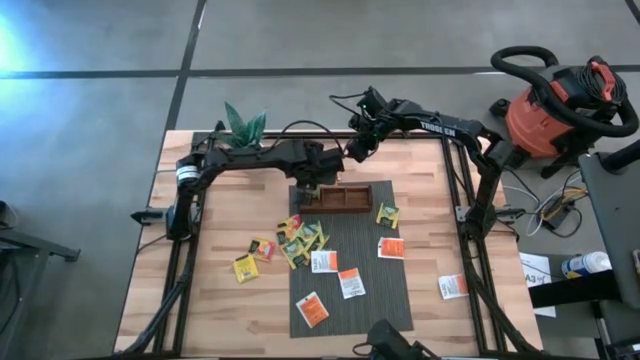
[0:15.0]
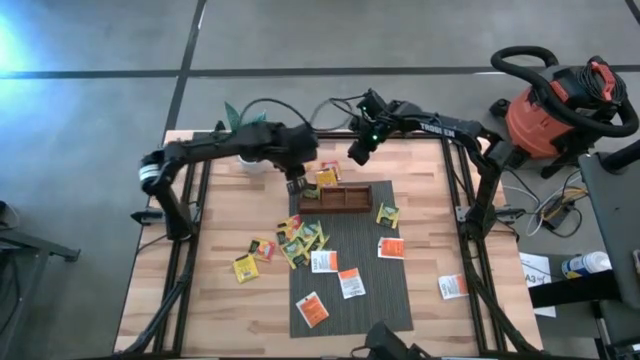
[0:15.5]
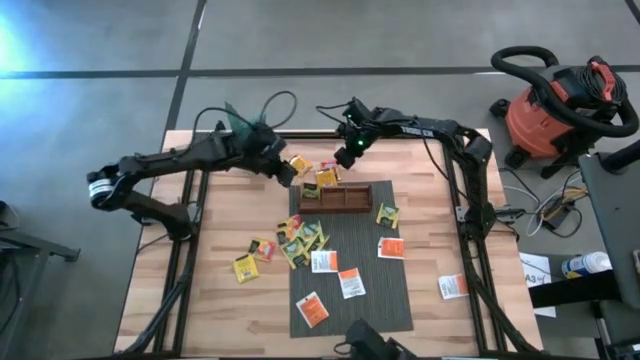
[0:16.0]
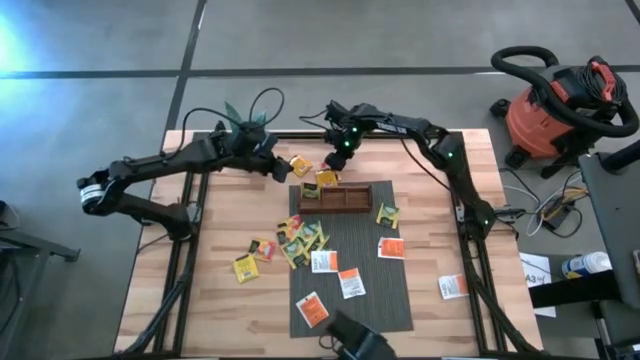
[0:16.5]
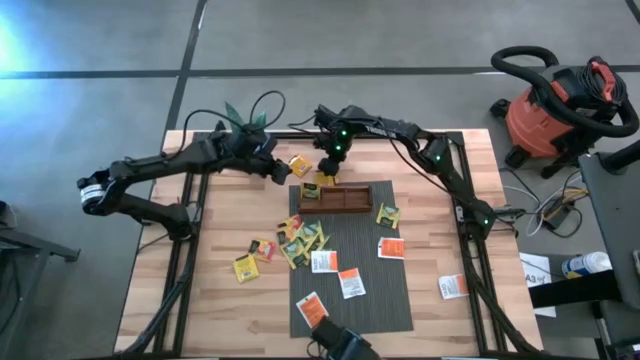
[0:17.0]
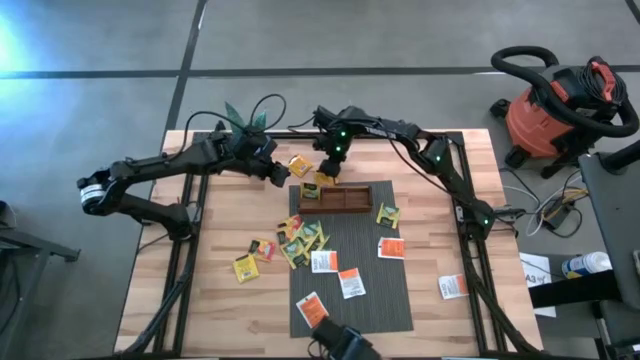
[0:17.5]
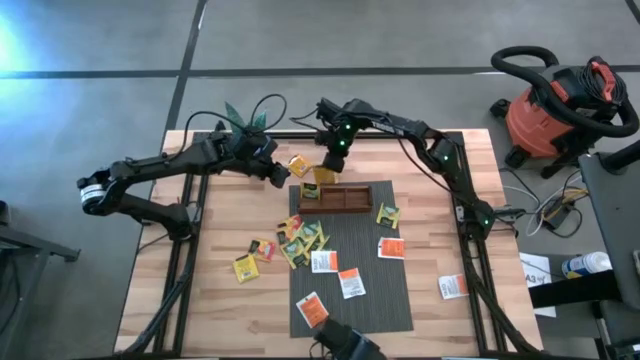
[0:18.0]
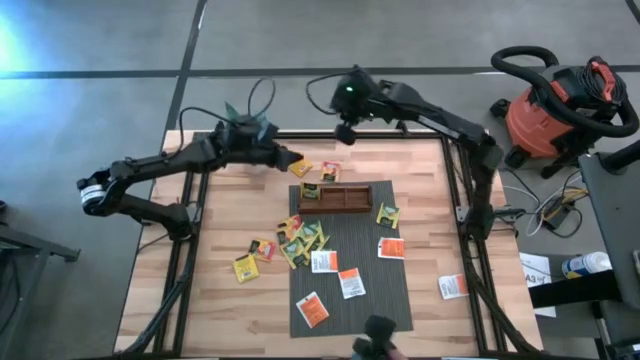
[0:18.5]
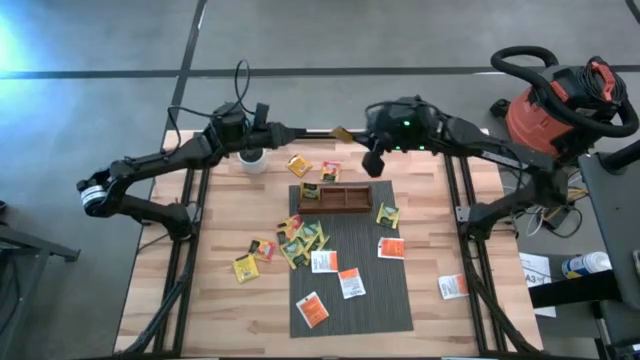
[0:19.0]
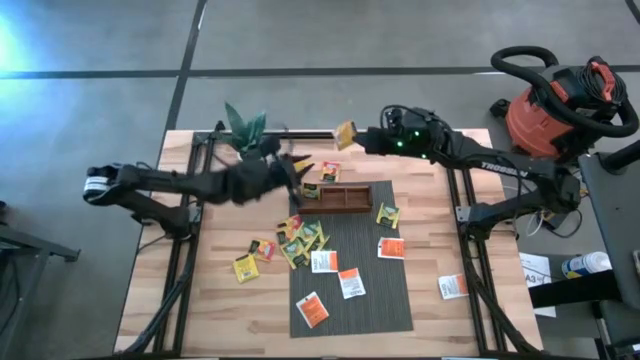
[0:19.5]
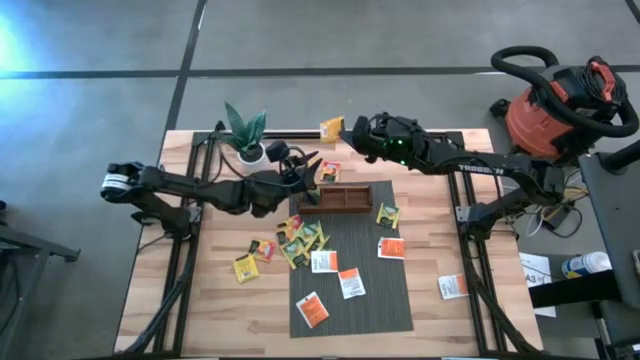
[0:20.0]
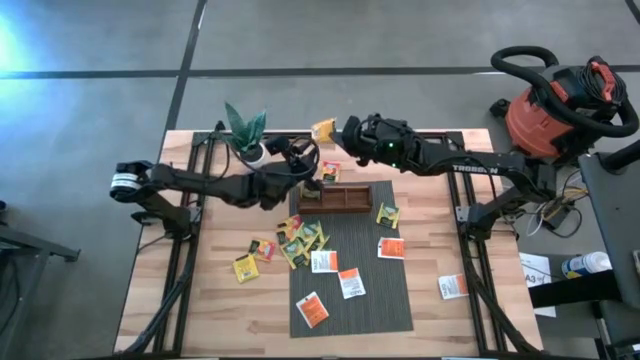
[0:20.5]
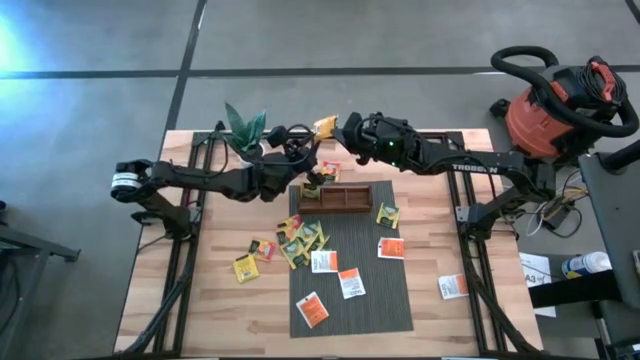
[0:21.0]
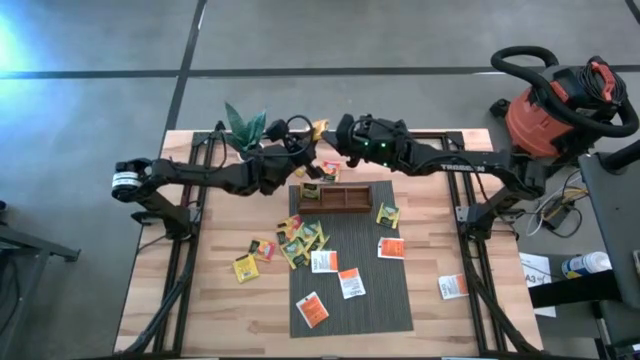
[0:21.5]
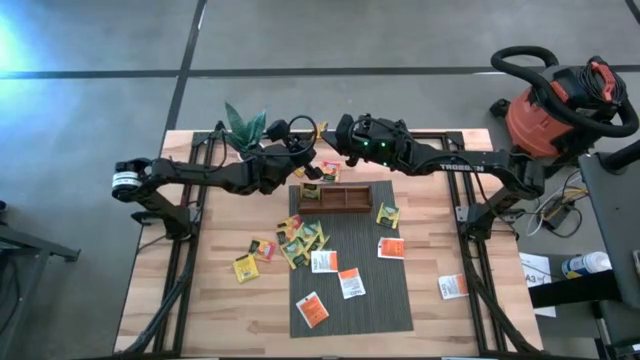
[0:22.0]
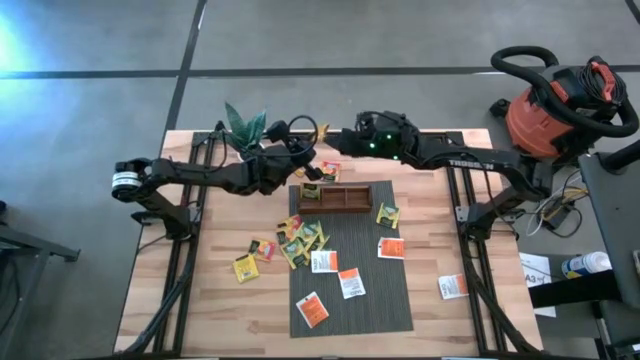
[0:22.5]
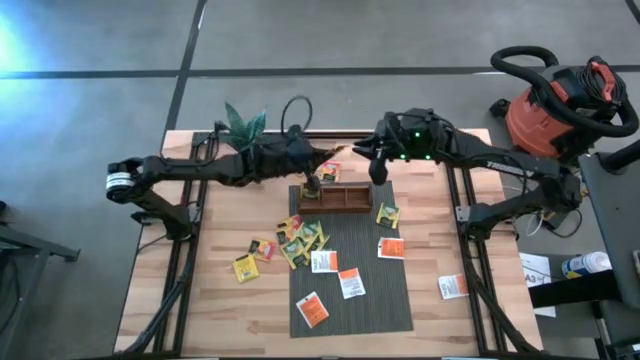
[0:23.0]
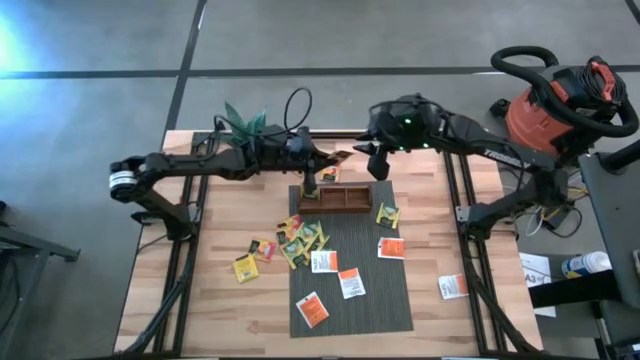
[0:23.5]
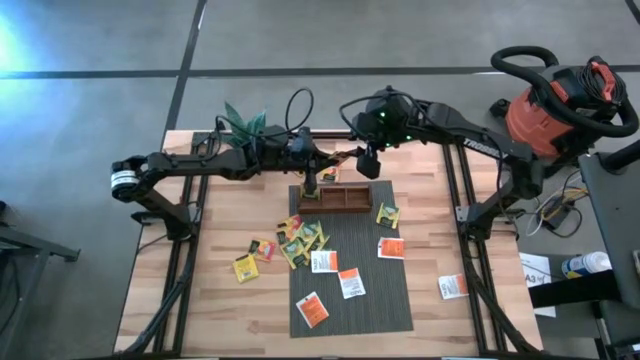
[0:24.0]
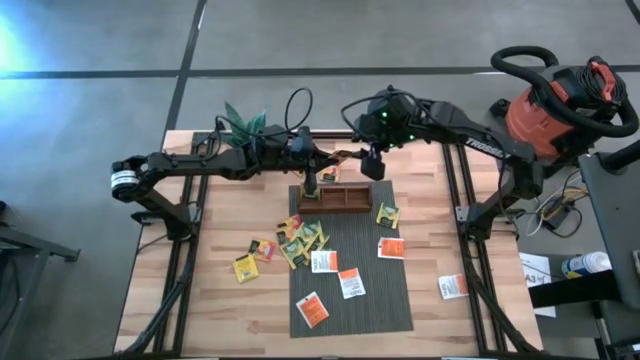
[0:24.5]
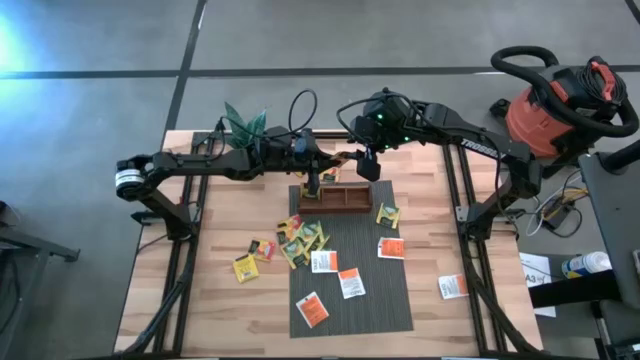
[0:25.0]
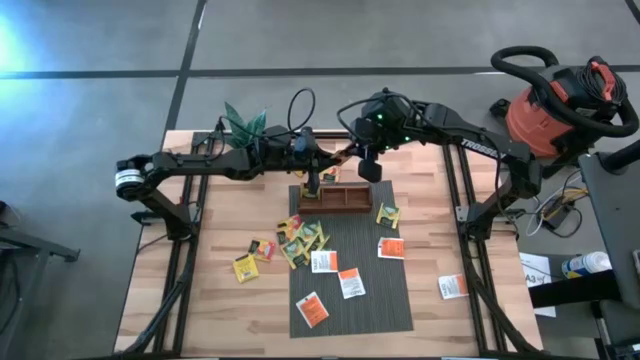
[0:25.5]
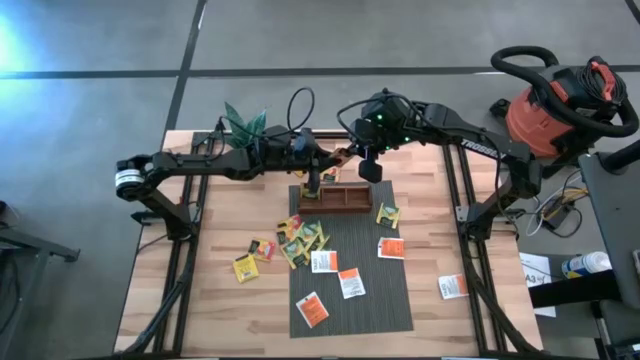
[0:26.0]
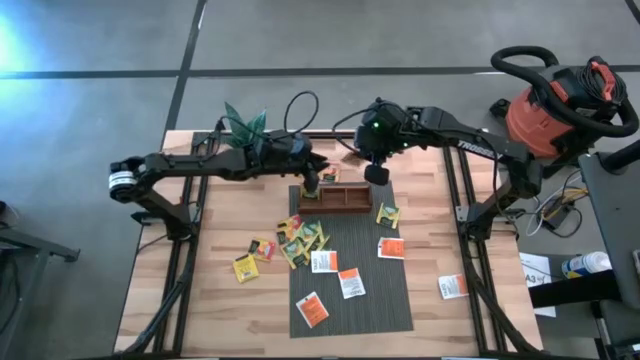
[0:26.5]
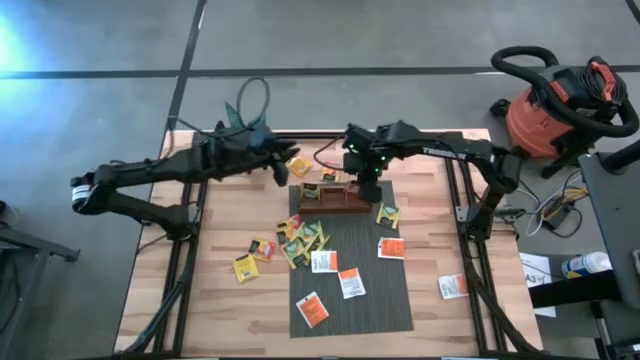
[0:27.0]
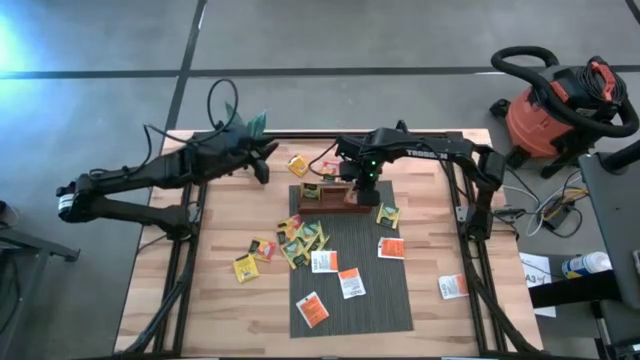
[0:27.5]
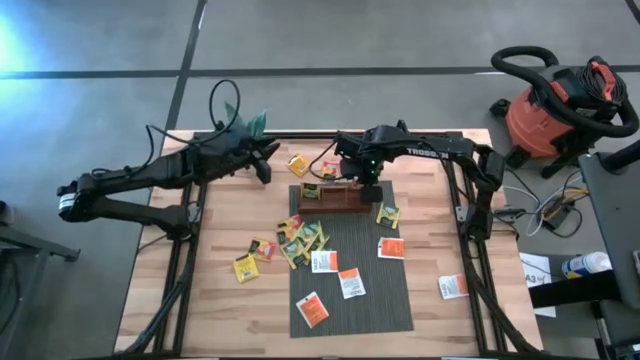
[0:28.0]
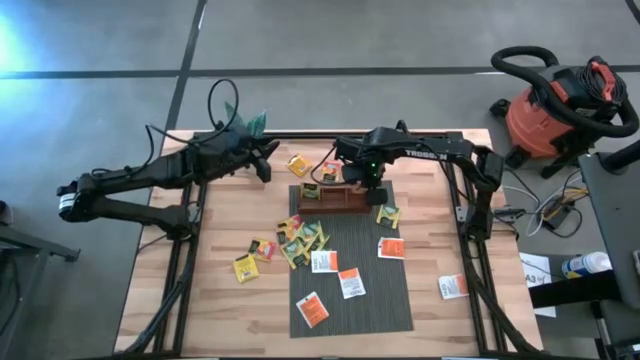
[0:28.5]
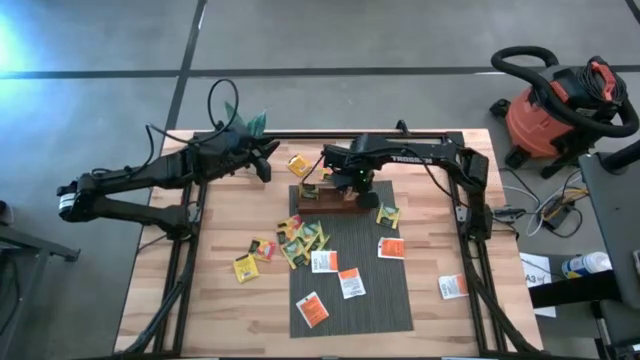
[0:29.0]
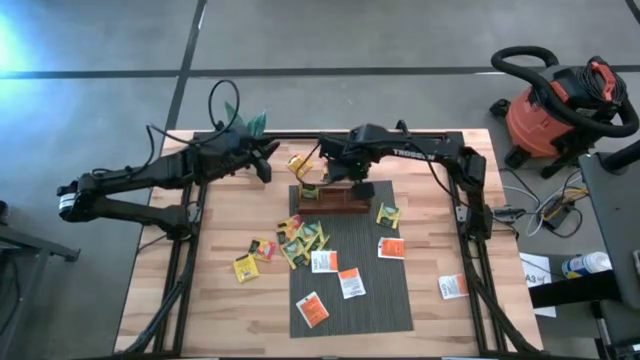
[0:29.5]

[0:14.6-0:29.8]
Task: Pick & Place Tea
Put the orange tea bag into the right compartment of the wooden organizer

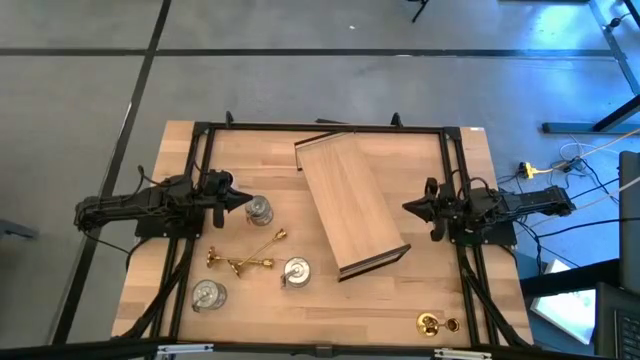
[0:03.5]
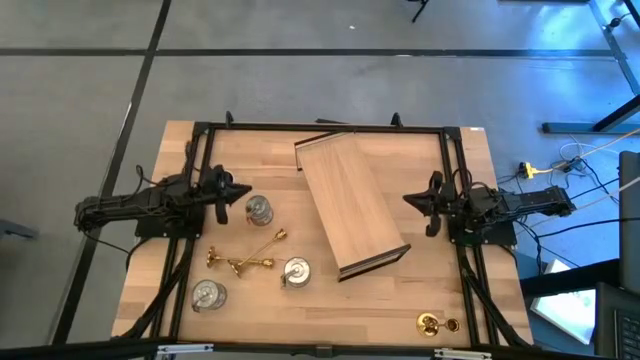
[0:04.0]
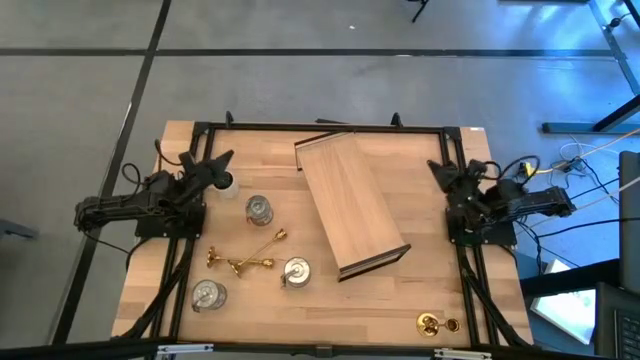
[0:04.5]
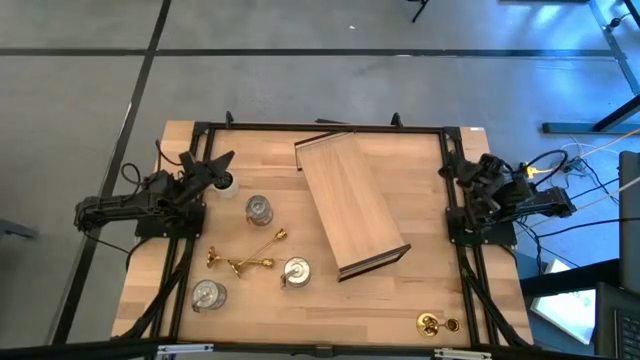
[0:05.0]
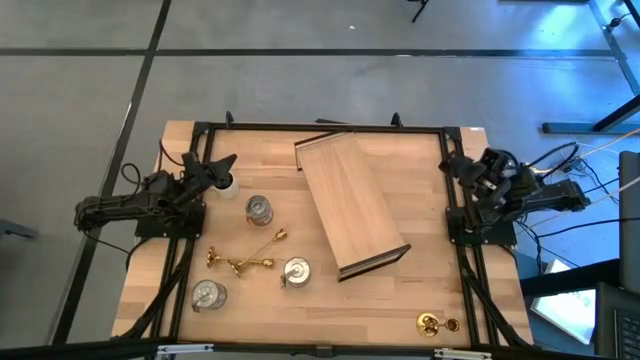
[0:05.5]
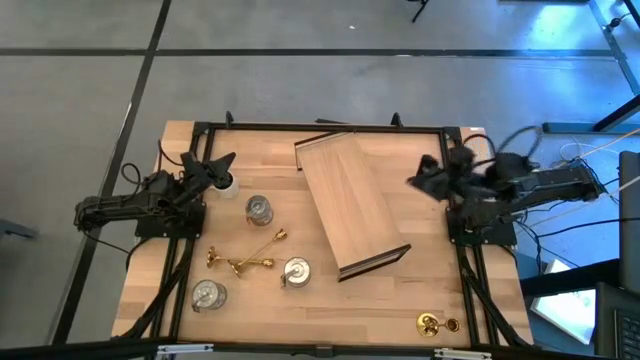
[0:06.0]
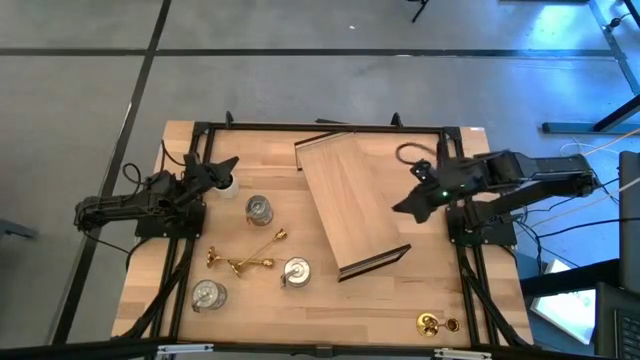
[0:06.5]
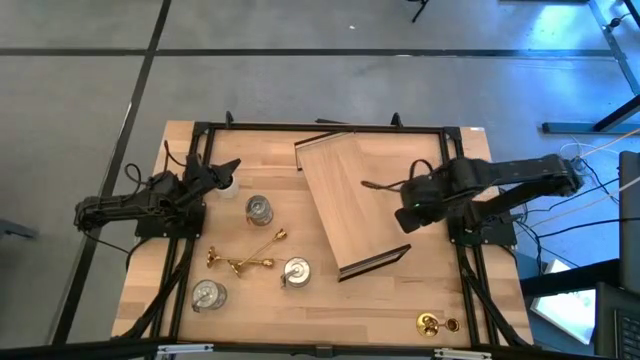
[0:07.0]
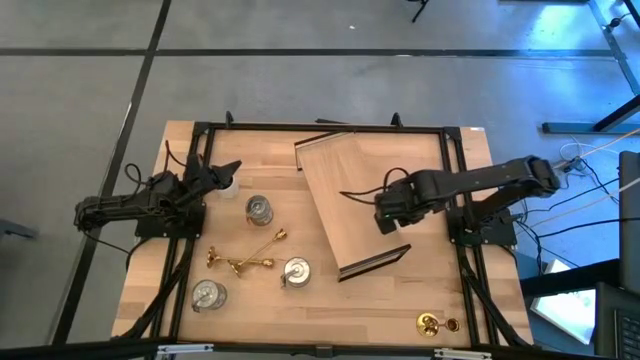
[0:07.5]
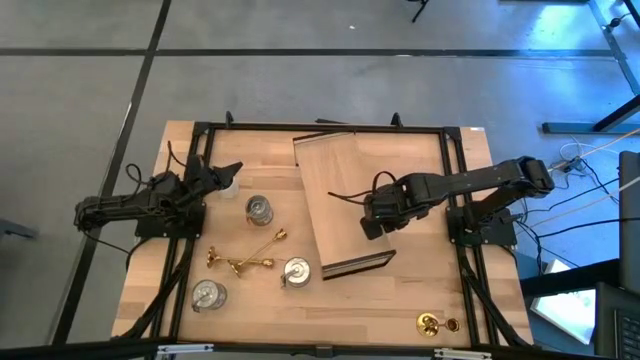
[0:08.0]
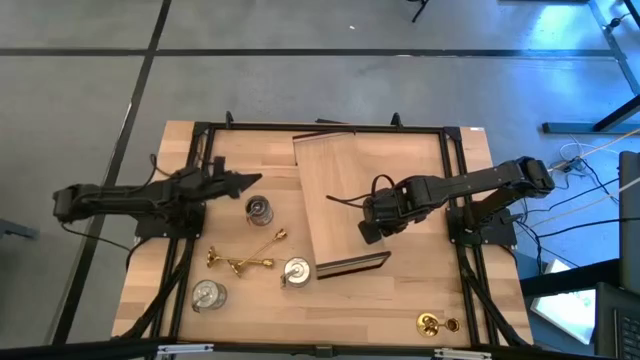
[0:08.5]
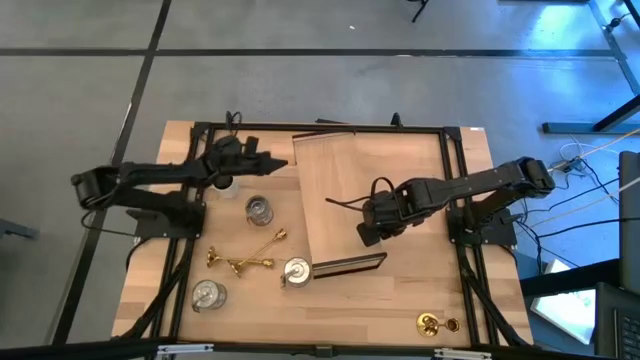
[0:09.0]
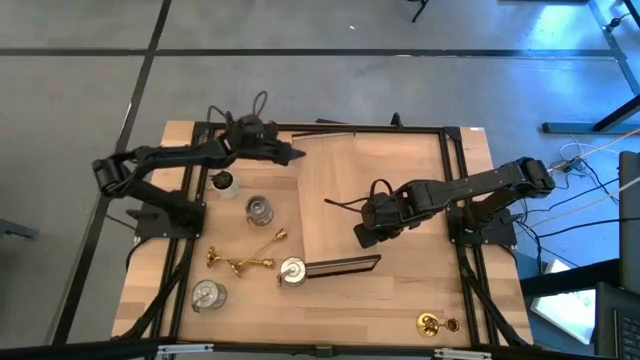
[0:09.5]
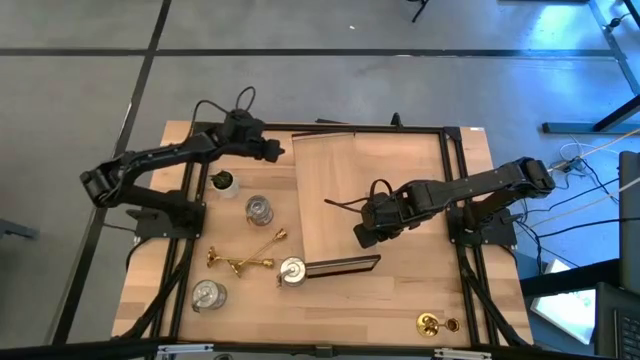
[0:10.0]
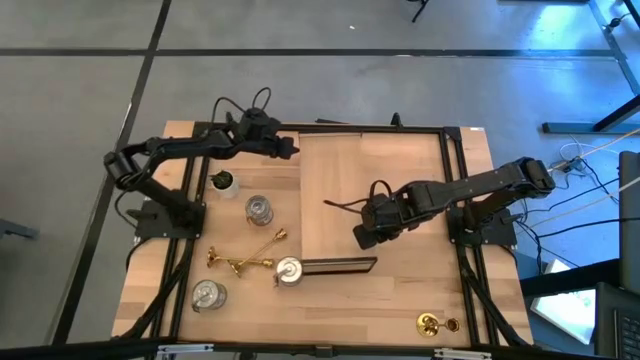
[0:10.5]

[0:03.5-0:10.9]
Task: Pick & Place candle stick holders
Adjust the shelf
